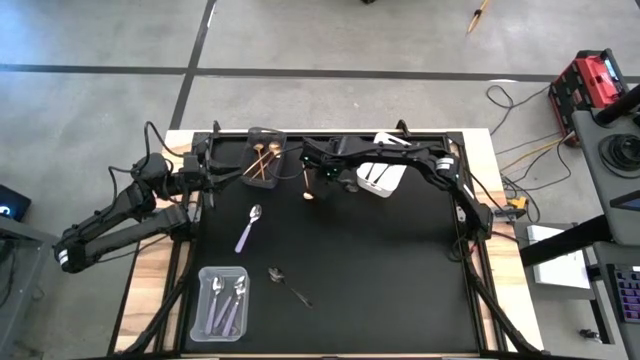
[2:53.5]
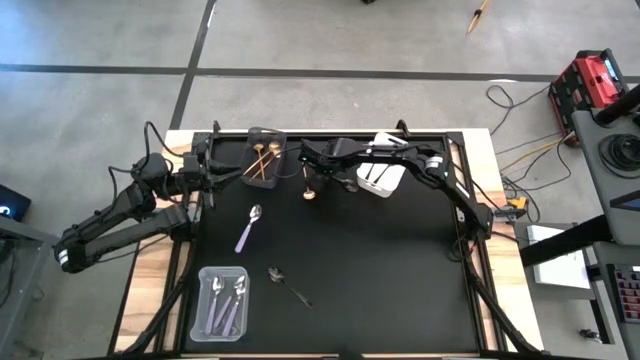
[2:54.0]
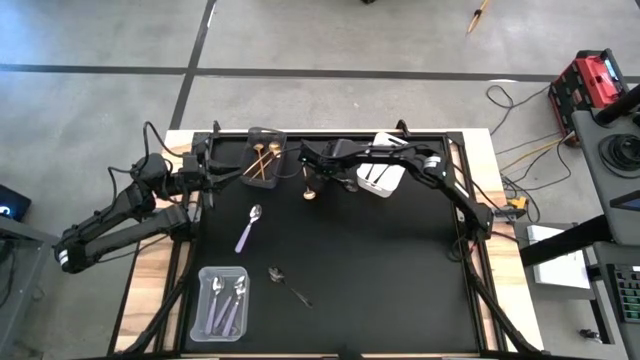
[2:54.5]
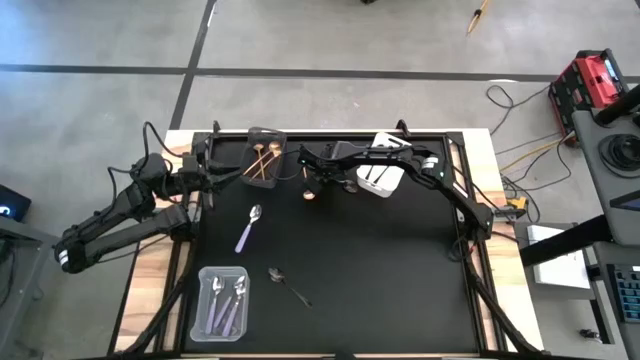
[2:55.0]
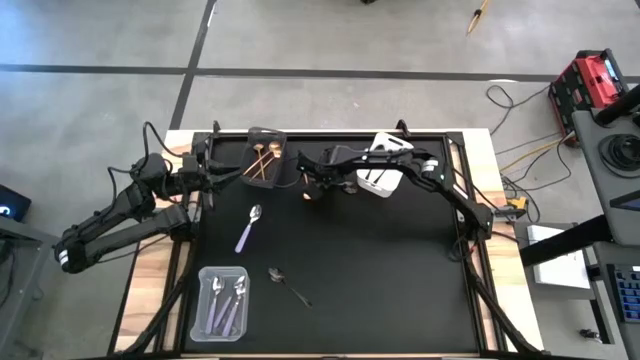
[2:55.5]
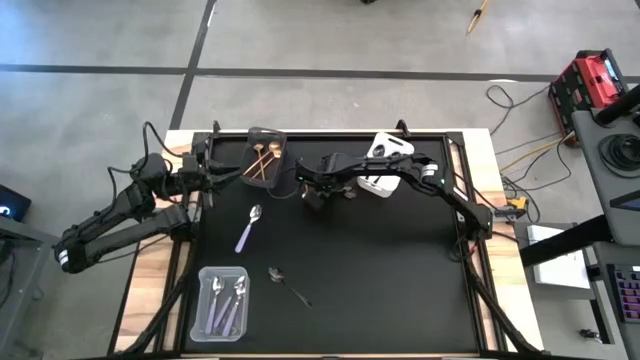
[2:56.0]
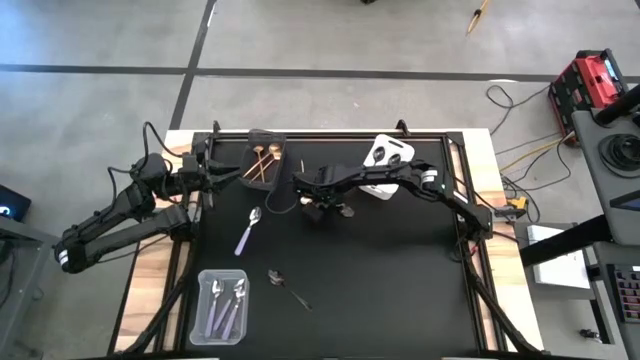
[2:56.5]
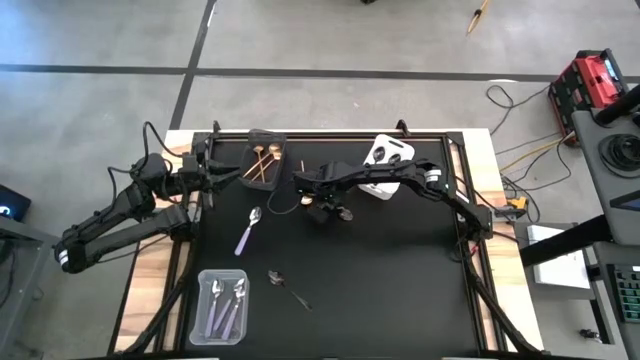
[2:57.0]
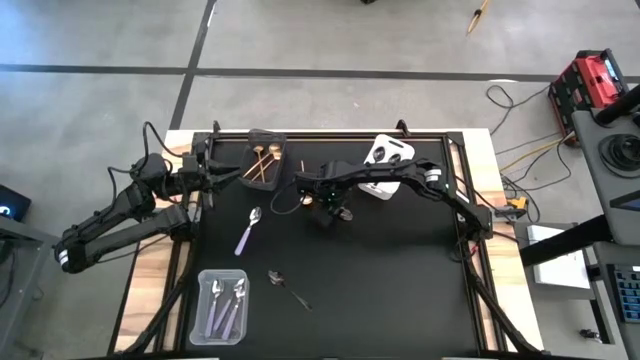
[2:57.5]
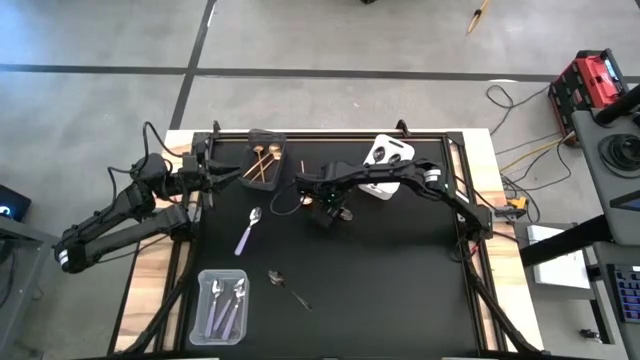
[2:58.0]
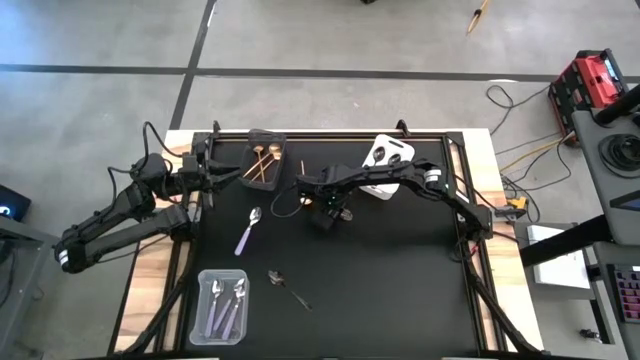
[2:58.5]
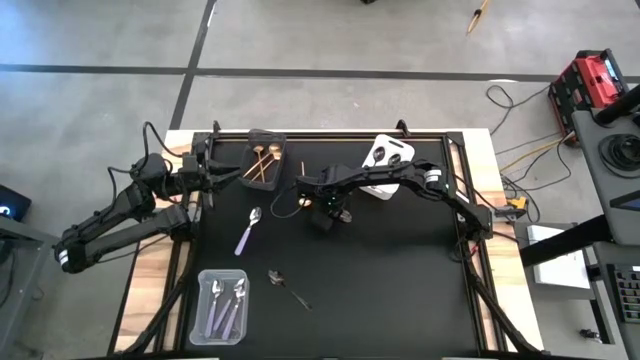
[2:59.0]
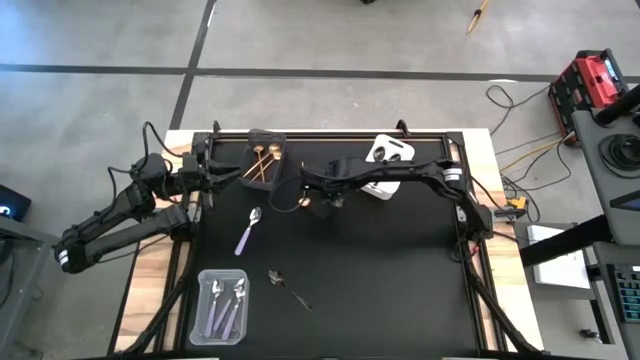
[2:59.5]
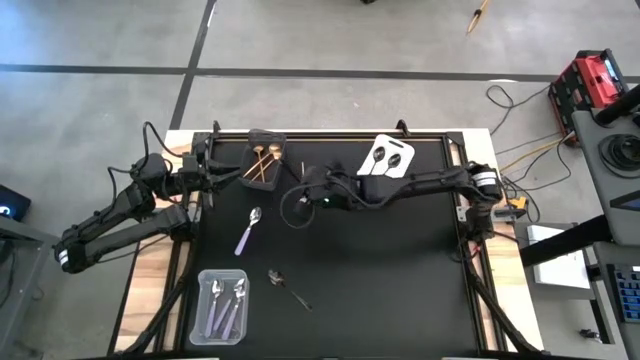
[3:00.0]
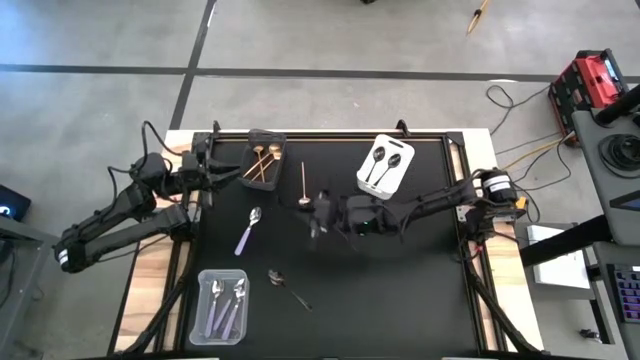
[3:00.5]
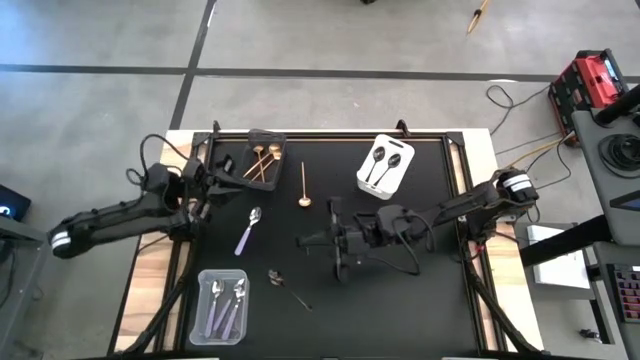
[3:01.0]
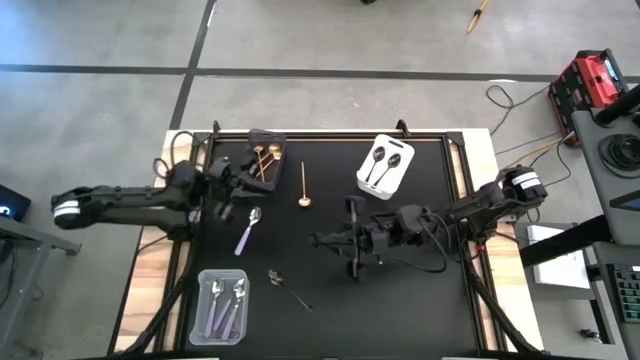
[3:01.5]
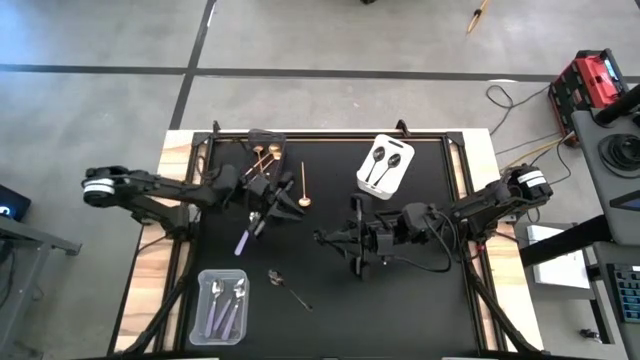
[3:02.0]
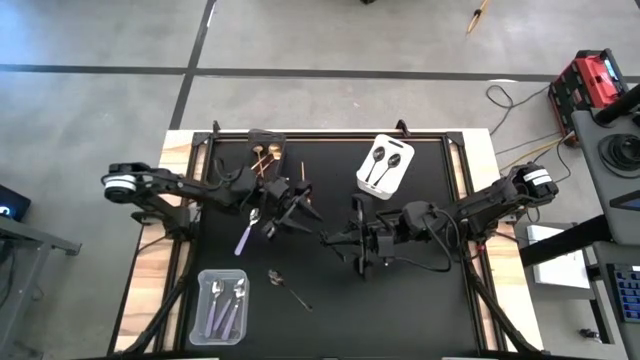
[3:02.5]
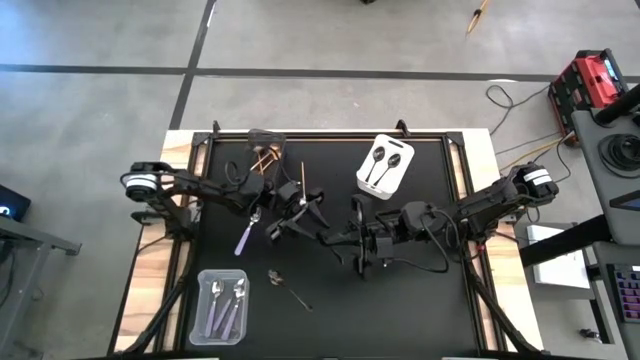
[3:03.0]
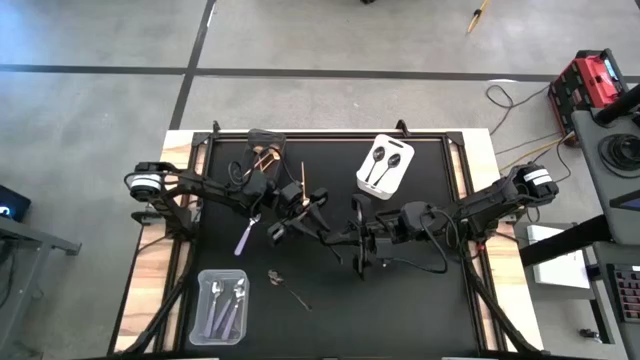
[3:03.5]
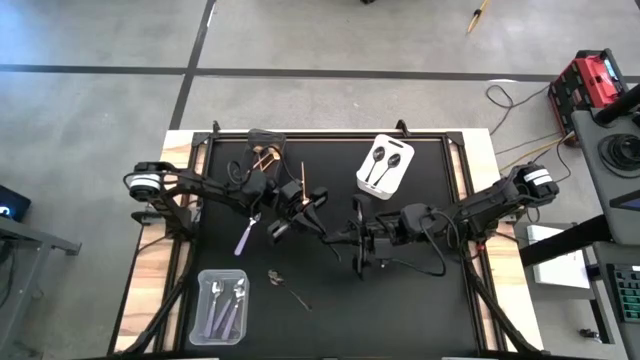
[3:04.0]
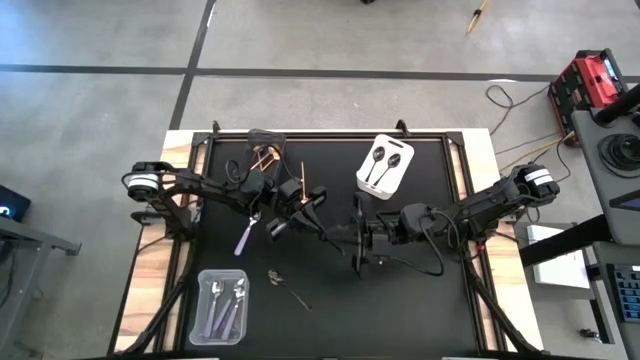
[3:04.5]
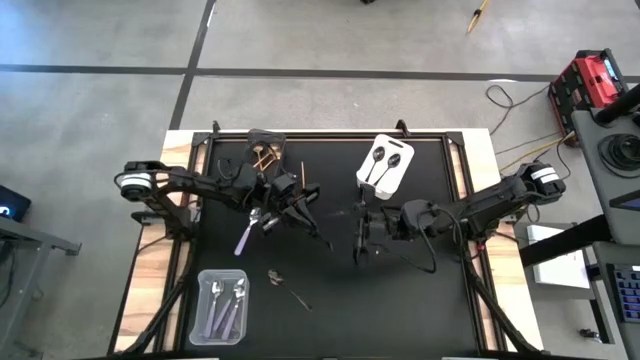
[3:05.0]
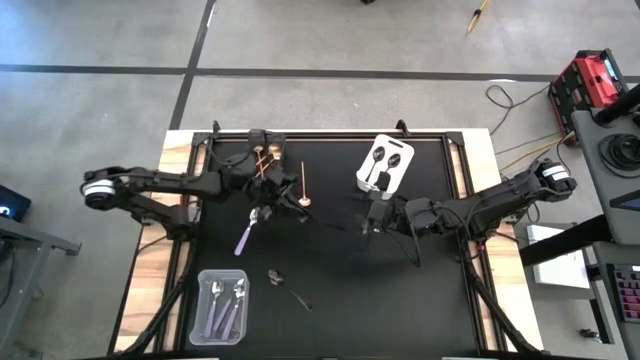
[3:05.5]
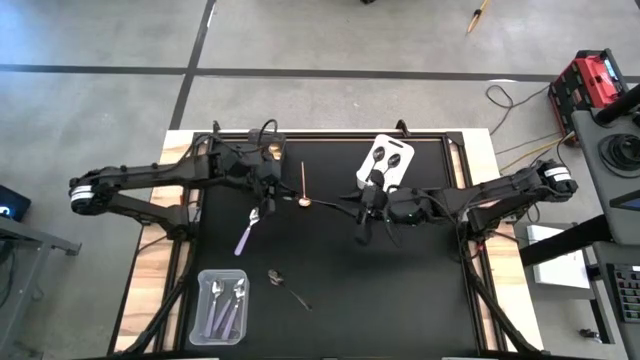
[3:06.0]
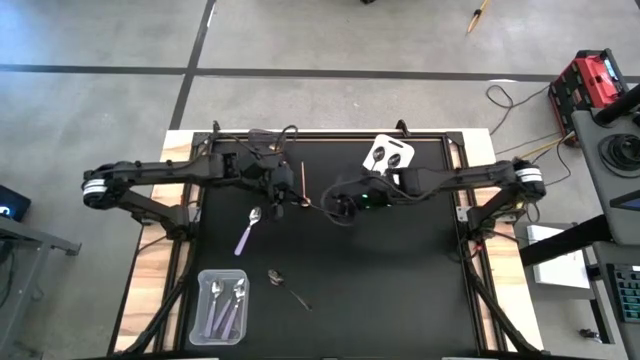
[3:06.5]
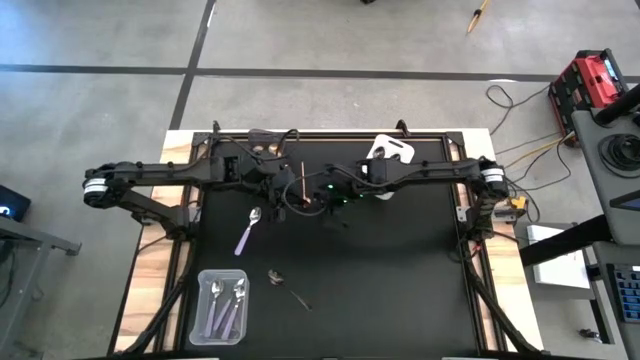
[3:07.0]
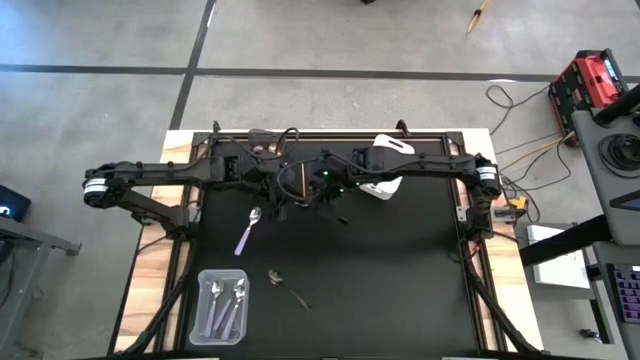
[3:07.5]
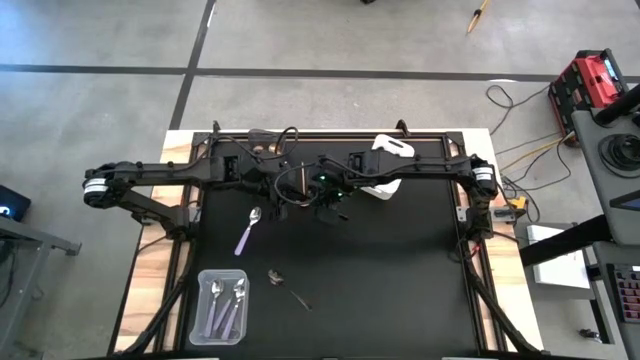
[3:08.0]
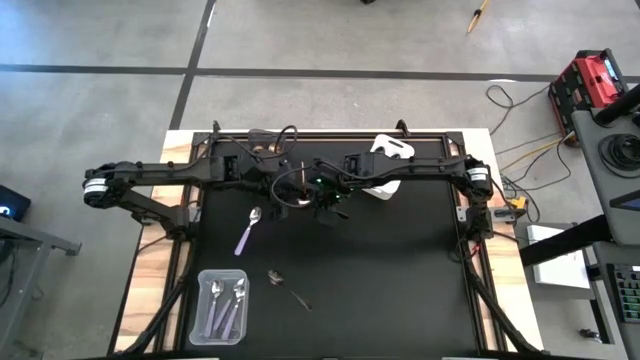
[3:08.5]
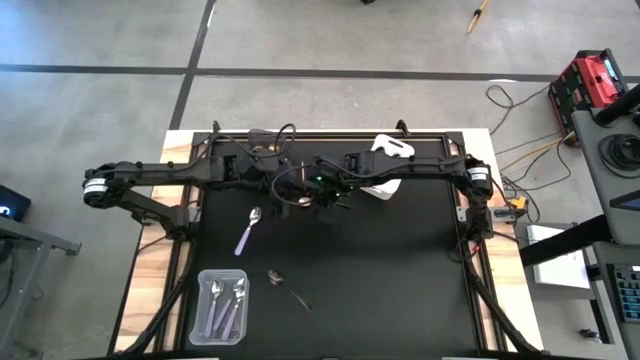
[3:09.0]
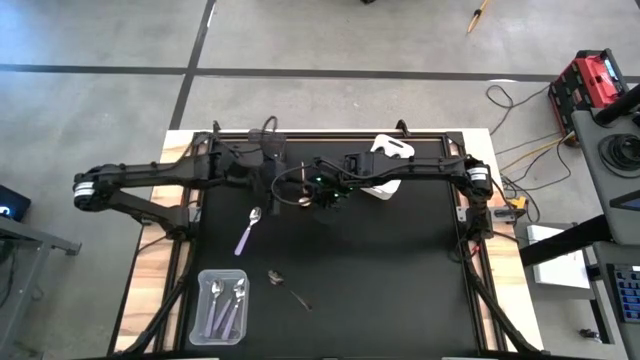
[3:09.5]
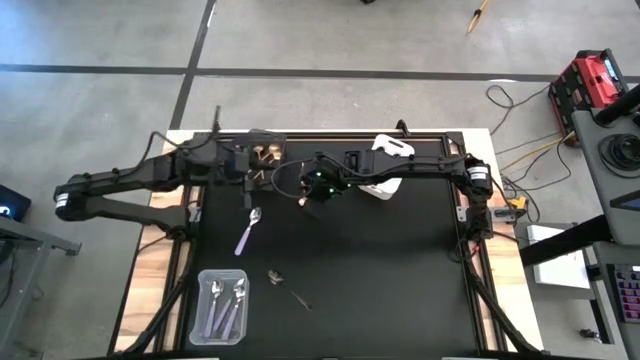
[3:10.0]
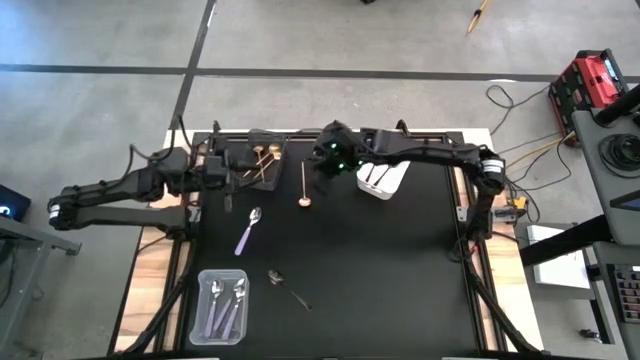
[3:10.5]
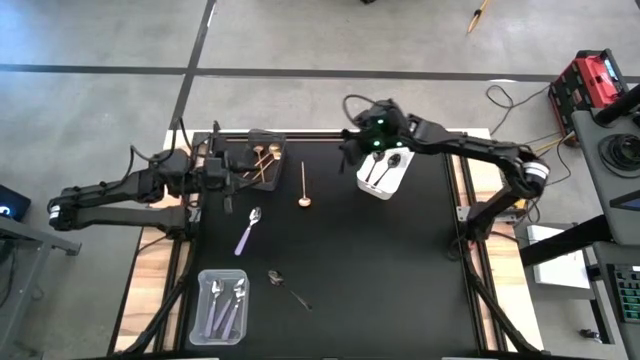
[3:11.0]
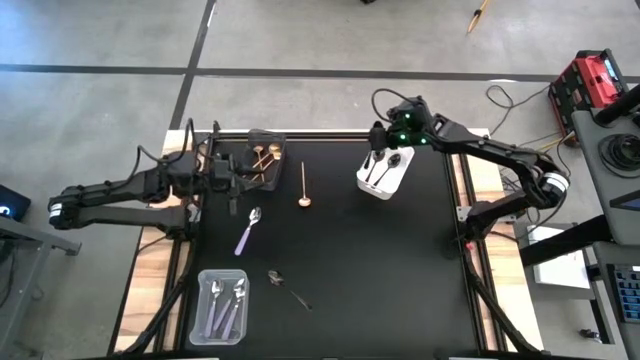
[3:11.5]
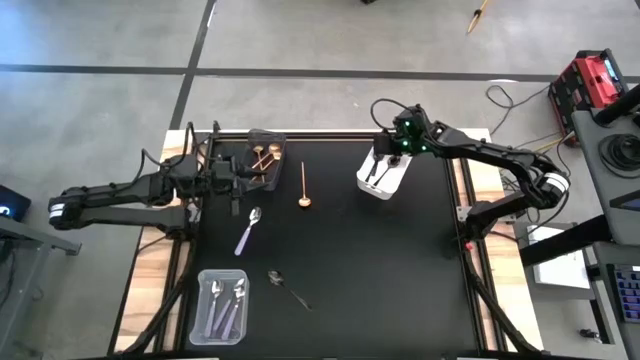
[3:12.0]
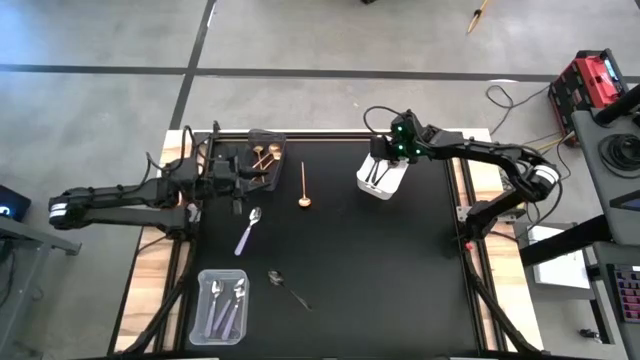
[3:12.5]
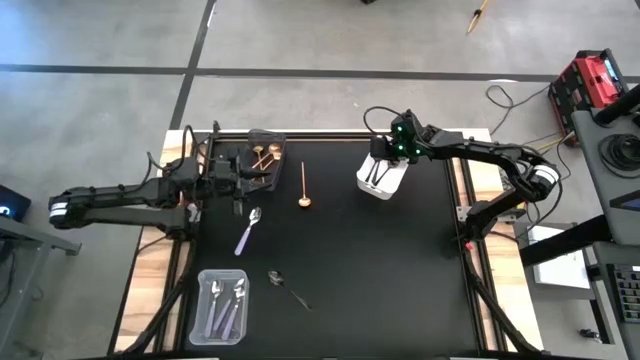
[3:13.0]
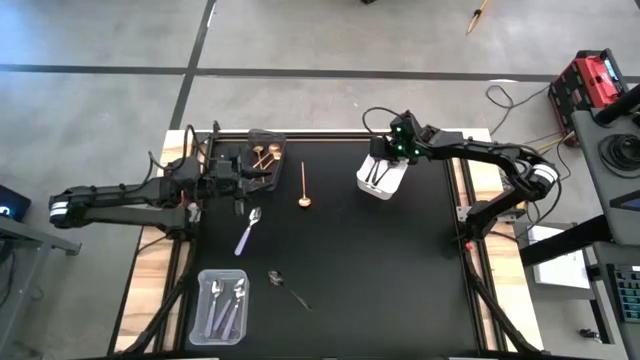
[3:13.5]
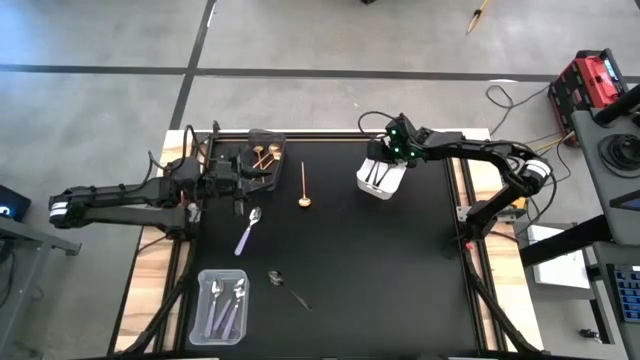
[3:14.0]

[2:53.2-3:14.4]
Task: Sort silverware by color (type)
Put the black spoon into the white bin
